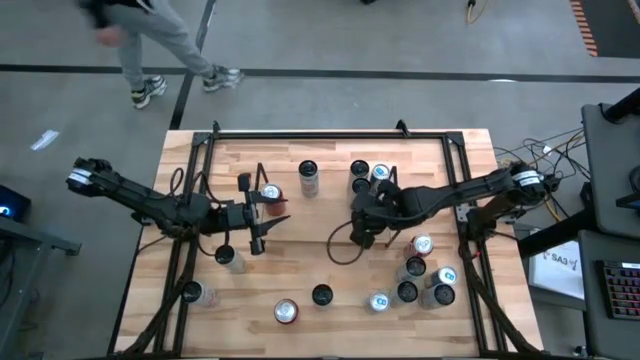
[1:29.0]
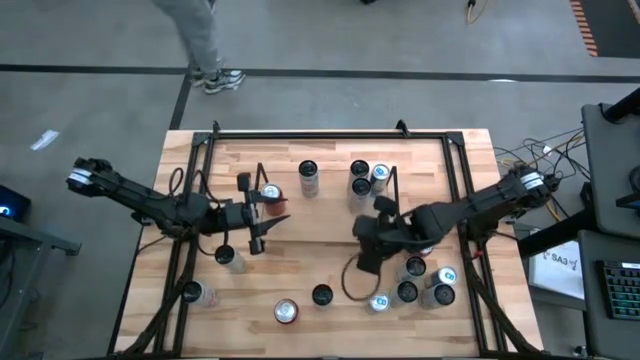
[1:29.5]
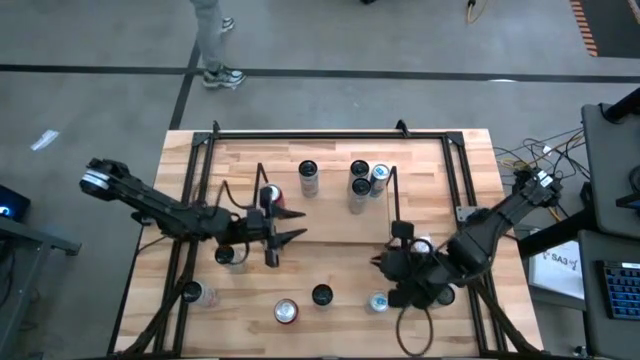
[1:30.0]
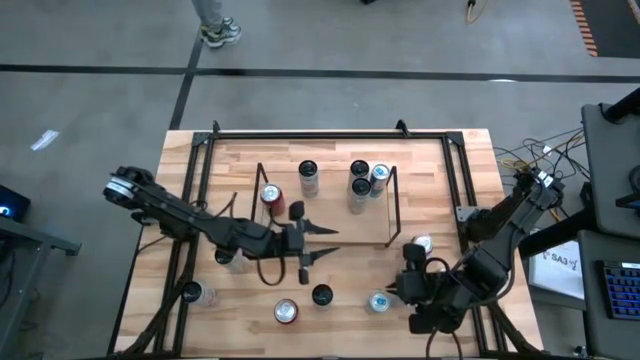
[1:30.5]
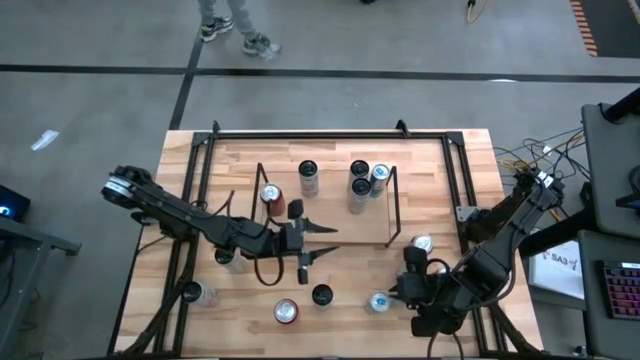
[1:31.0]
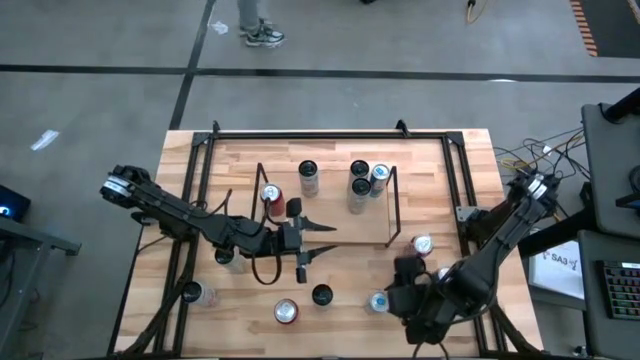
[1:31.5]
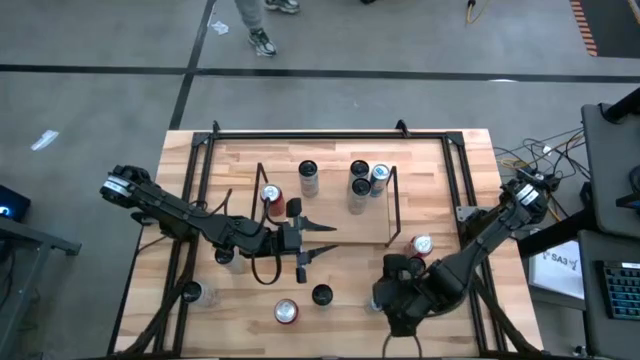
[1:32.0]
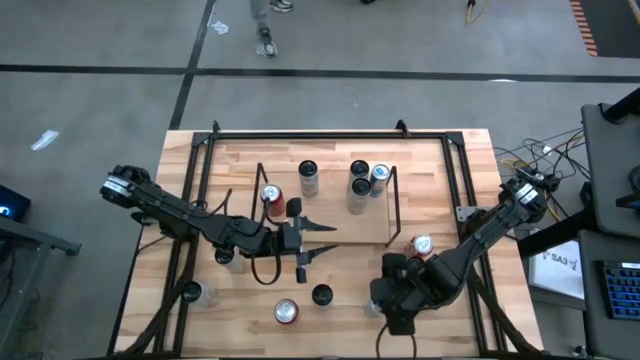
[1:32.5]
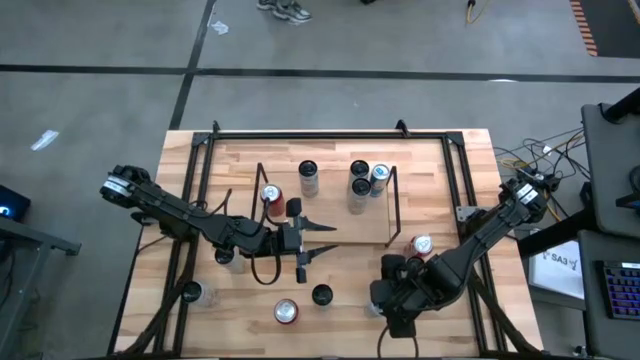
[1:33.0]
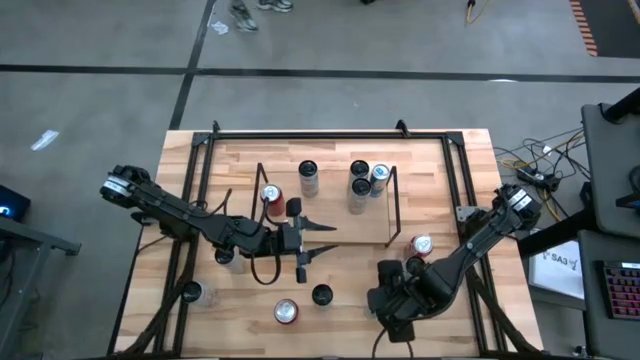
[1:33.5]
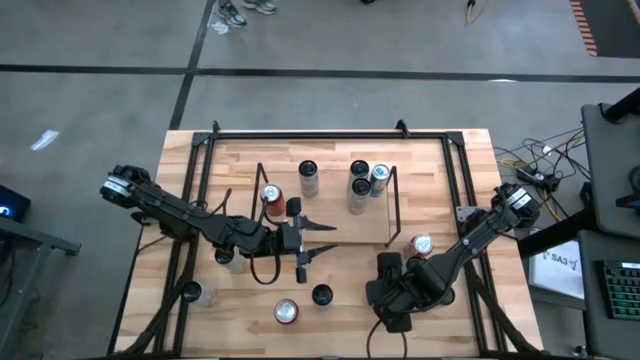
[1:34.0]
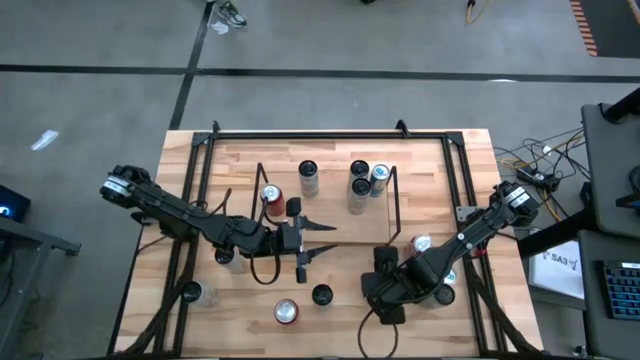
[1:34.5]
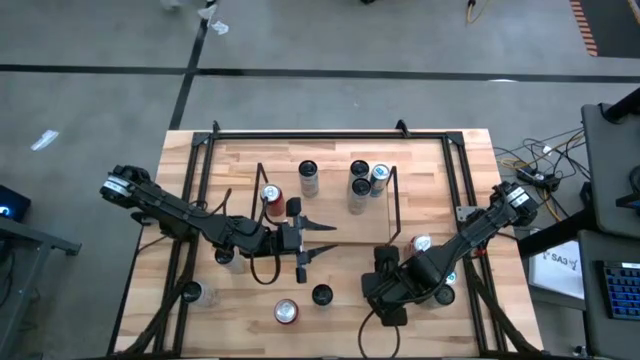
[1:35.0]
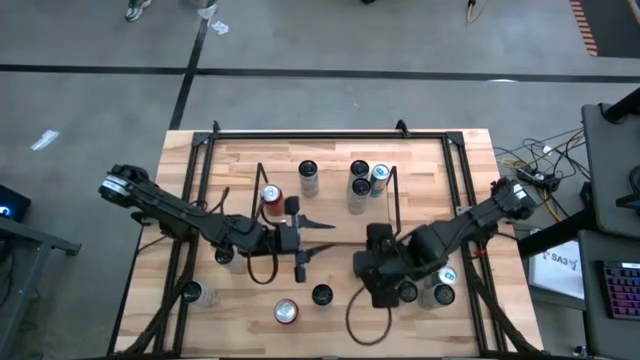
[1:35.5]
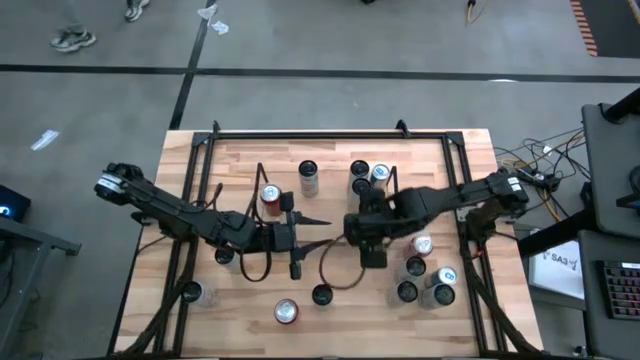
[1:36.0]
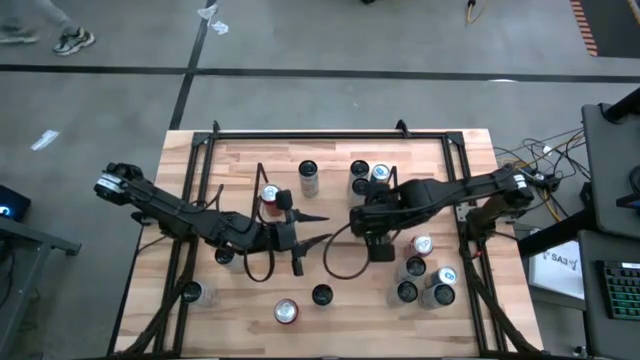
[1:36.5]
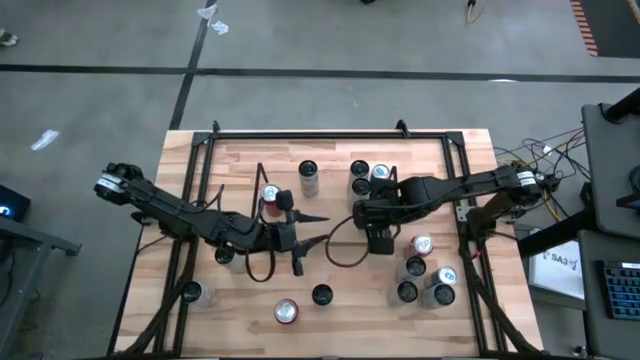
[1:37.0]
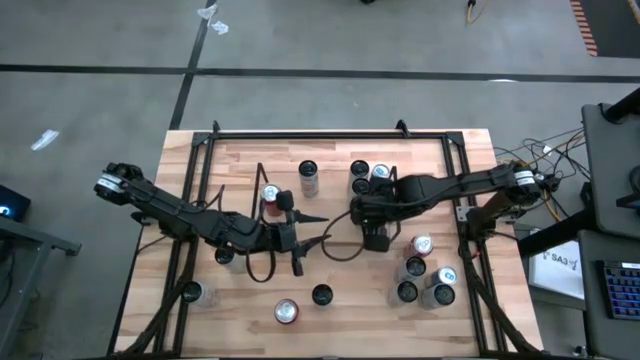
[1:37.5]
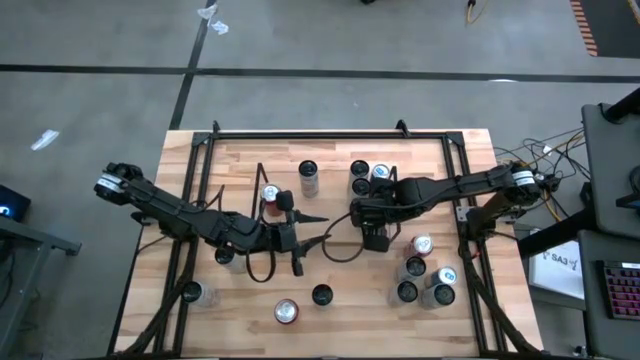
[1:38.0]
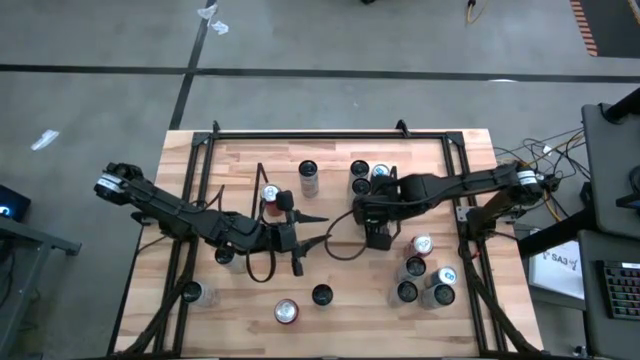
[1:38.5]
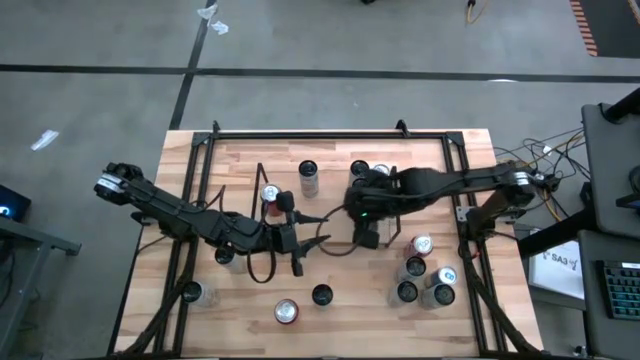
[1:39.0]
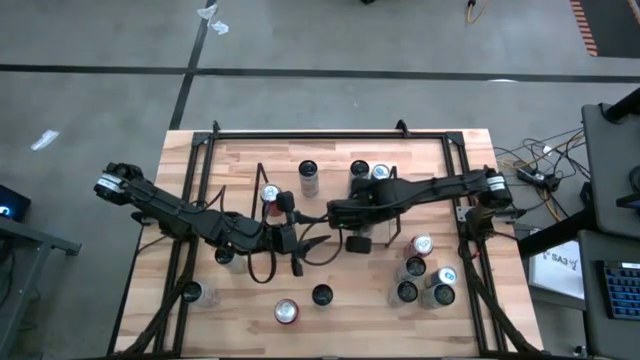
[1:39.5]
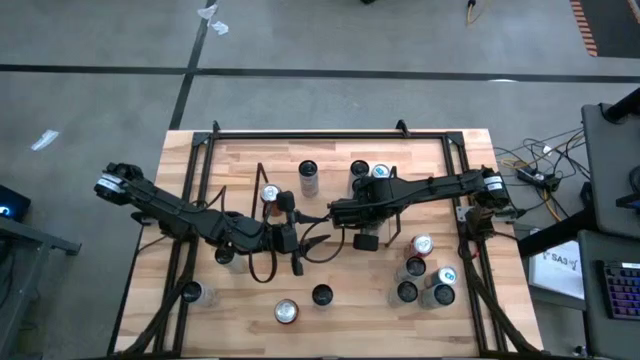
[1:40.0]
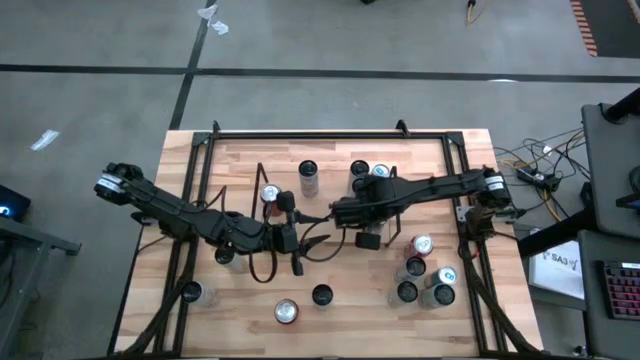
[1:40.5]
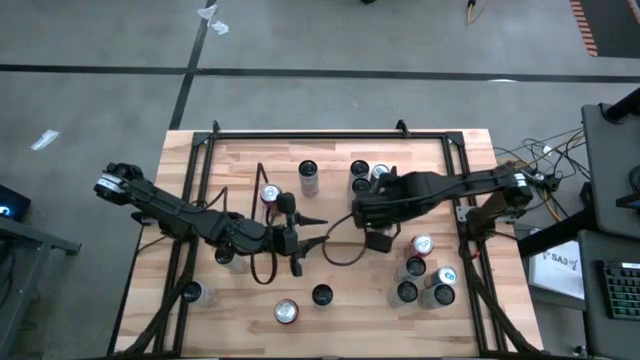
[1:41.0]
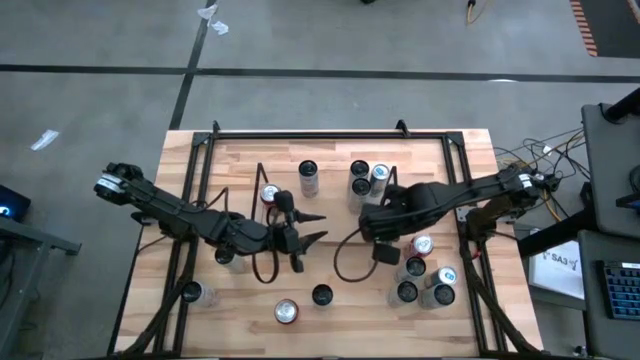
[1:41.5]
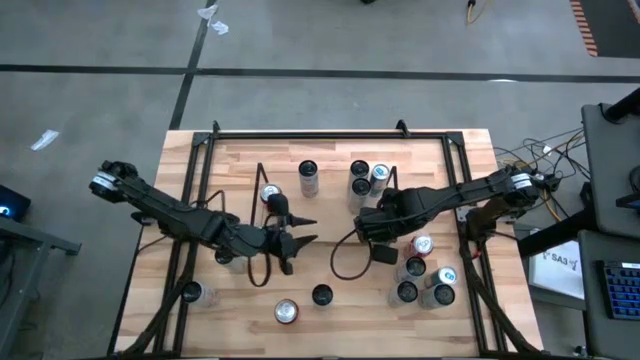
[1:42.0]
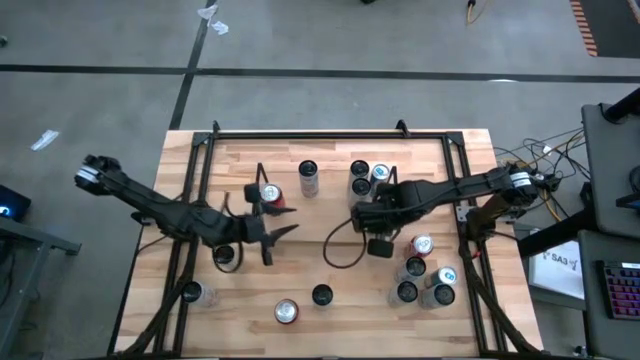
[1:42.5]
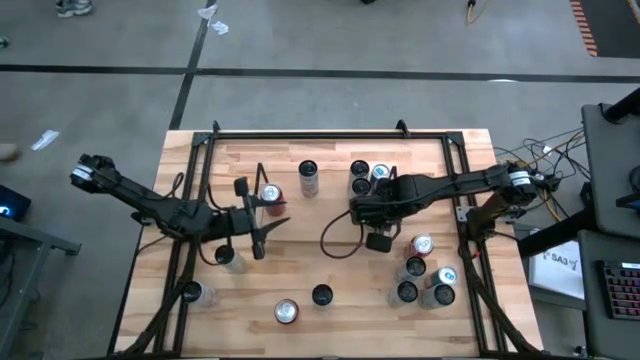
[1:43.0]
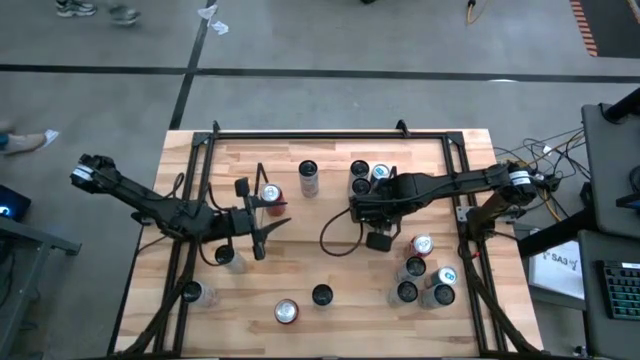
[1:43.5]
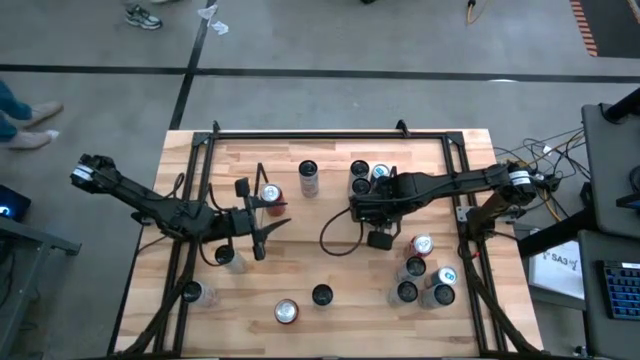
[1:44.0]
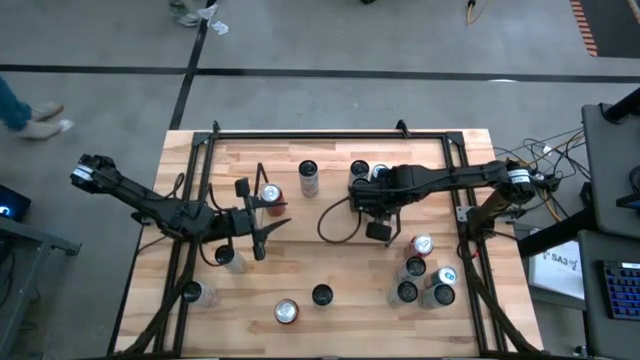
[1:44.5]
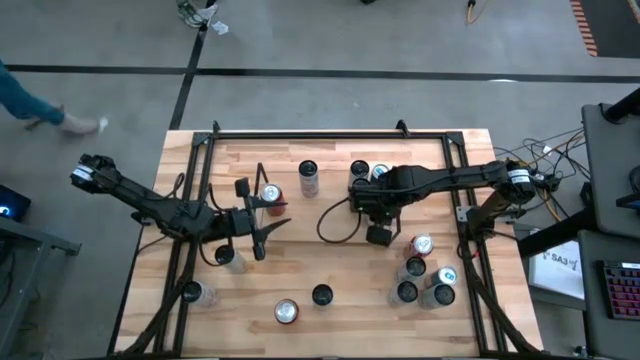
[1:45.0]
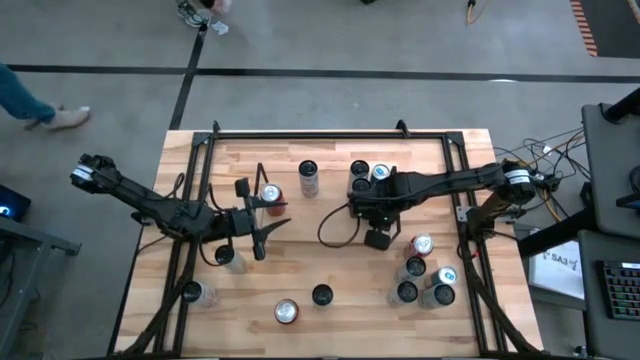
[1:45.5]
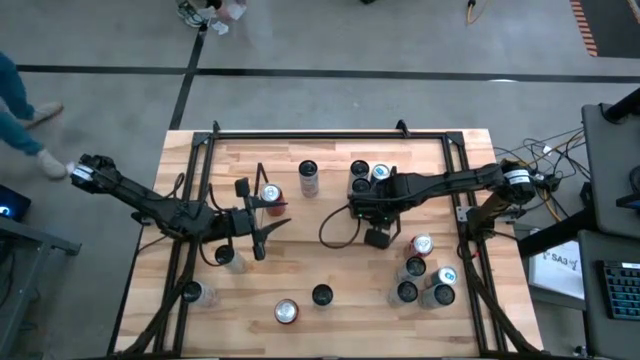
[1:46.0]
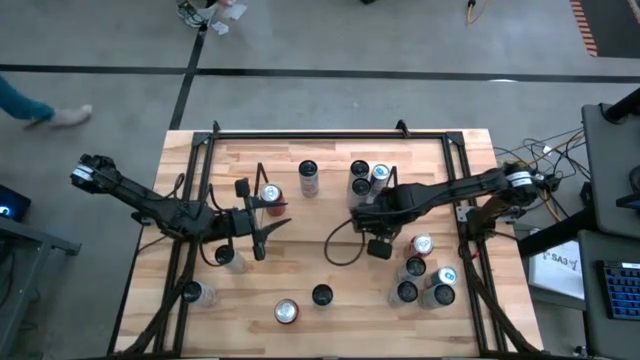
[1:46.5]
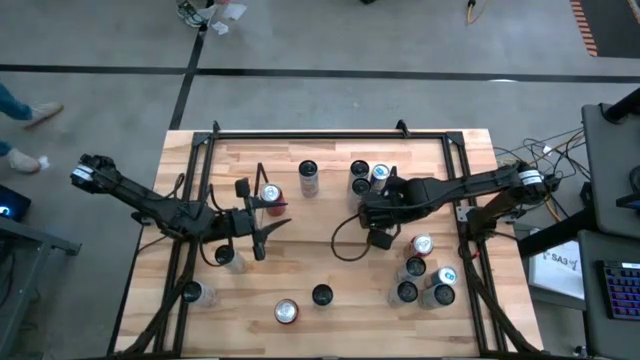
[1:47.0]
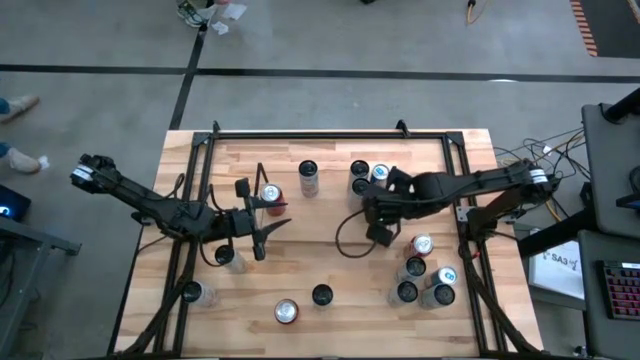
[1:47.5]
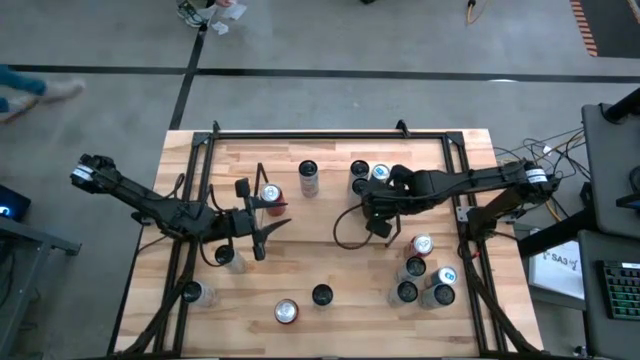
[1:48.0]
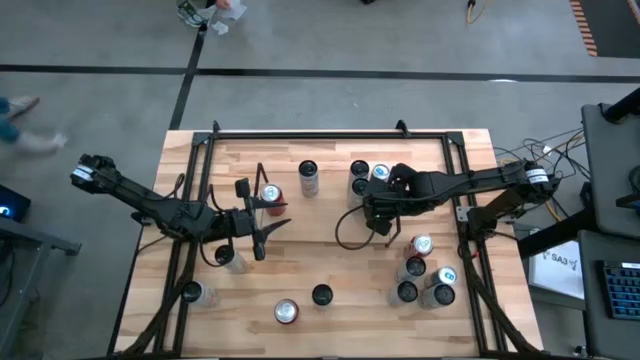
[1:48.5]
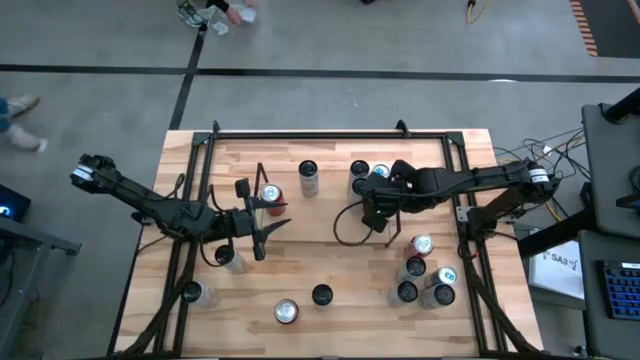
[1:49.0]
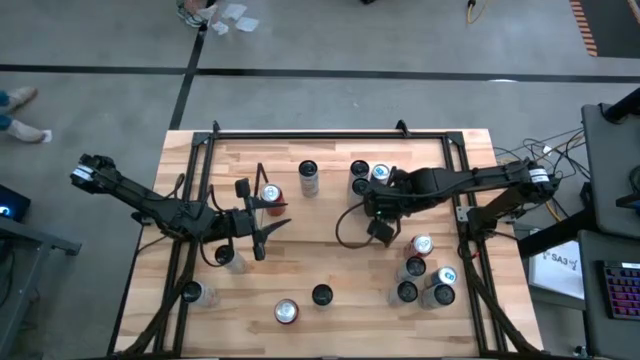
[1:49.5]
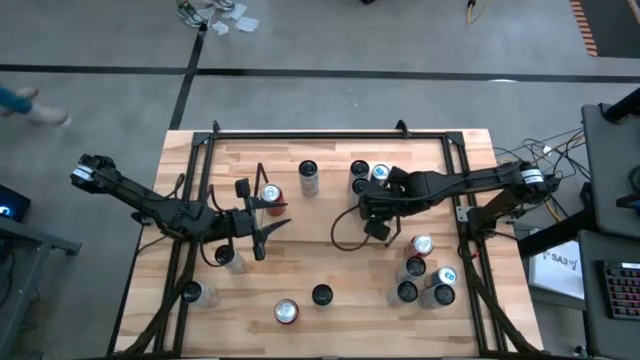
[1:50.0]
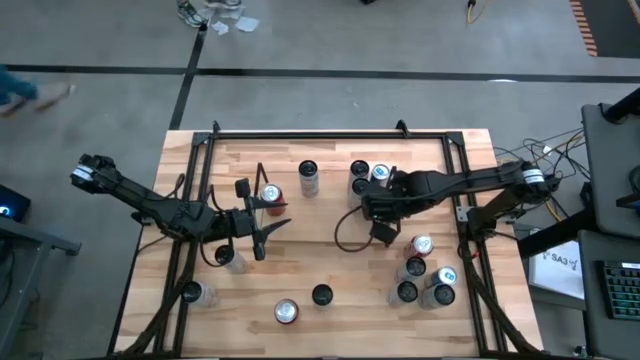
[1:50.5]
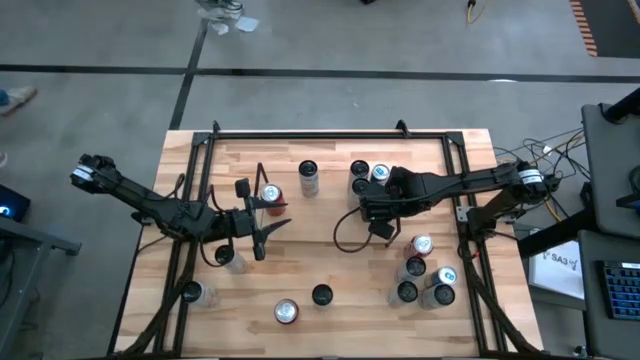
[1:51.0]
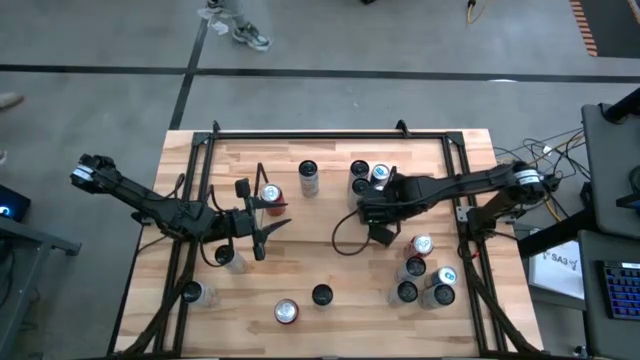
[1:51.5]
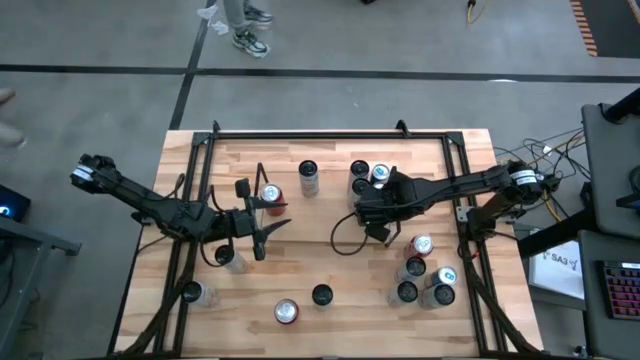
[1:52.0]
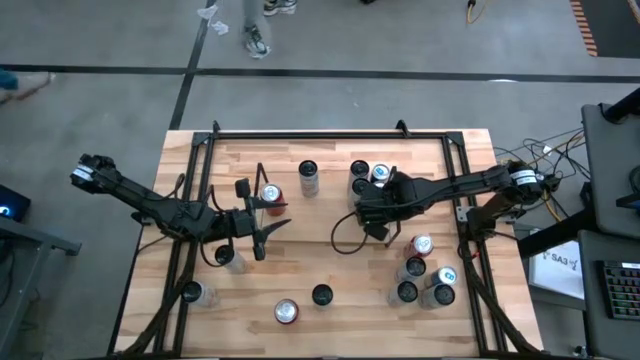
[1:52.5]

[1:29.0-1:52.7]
Task: Place canned beverage on shelf
Put the left blue soda can on the shelf aligned with the other blue soda can
